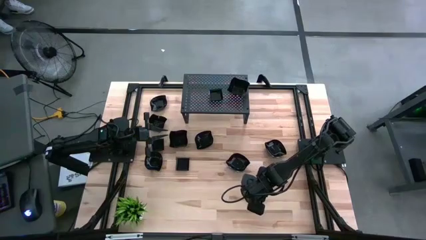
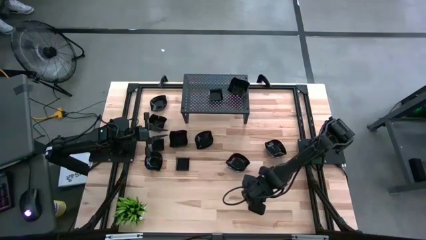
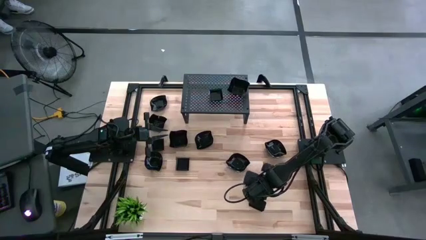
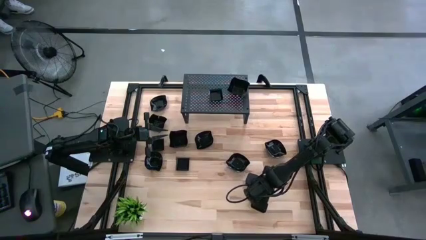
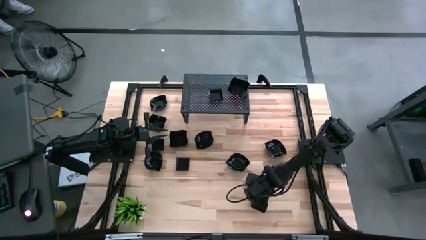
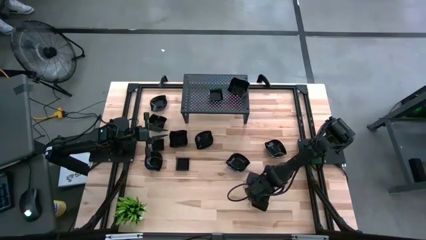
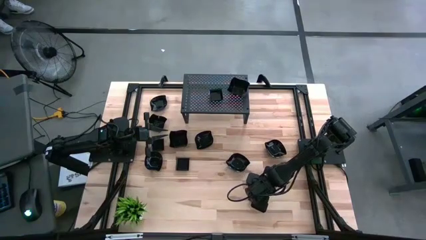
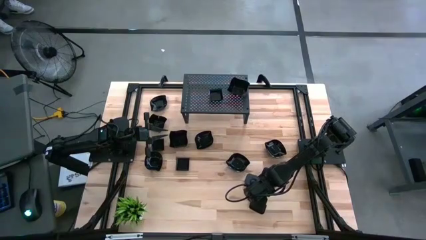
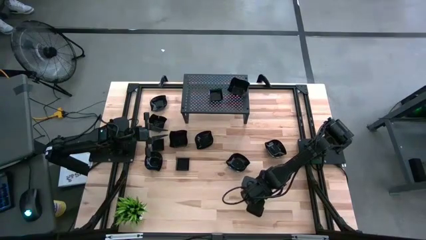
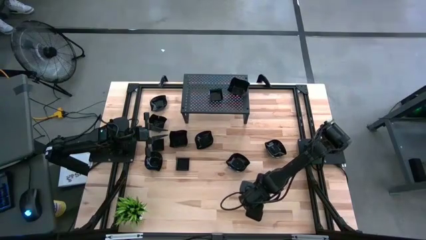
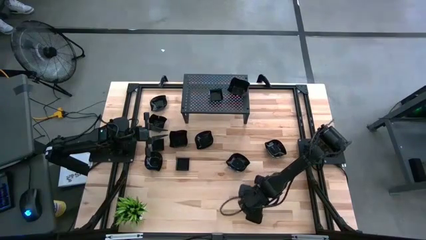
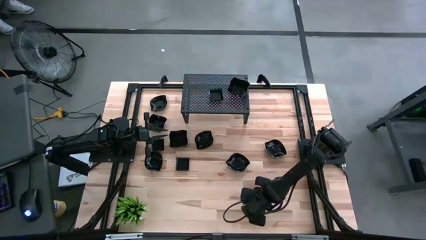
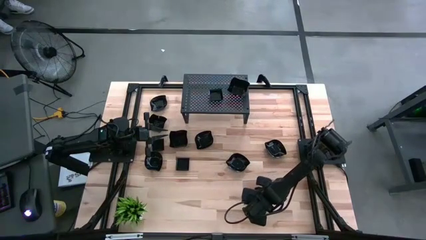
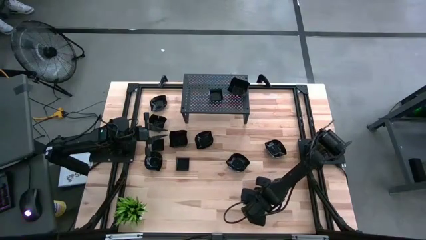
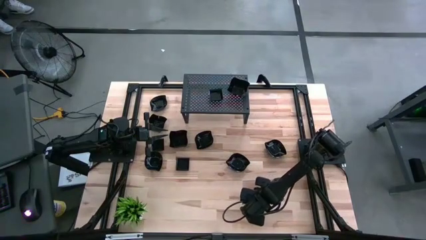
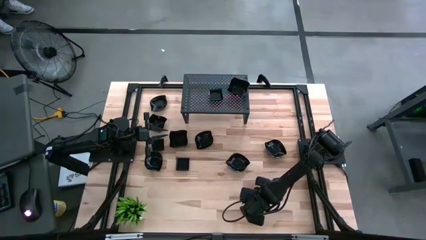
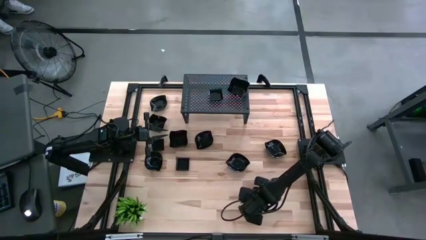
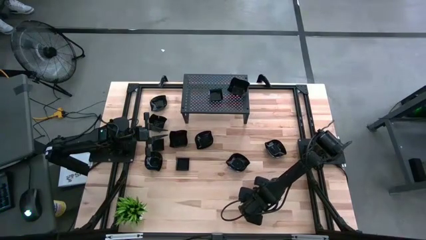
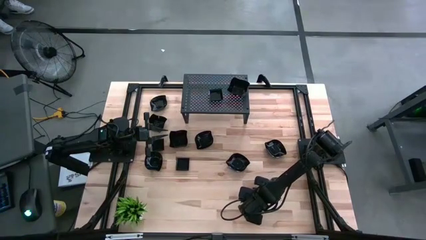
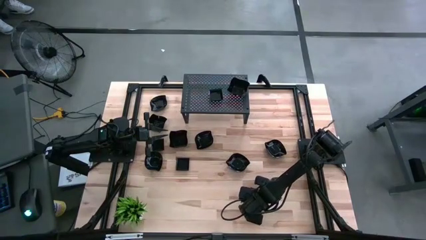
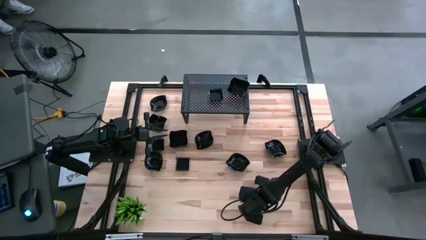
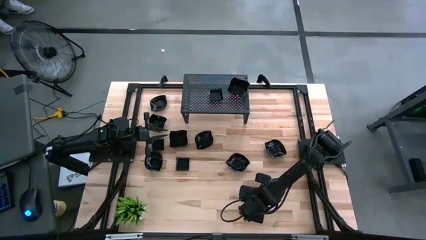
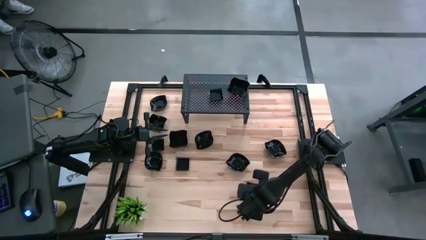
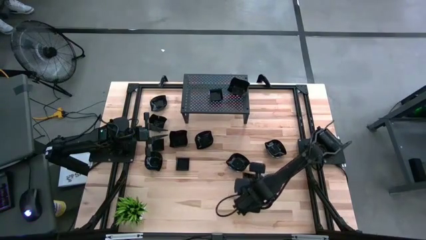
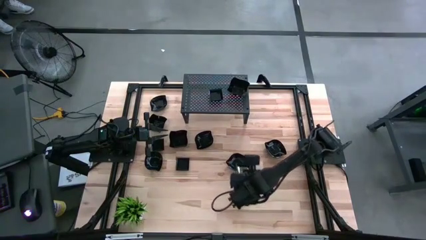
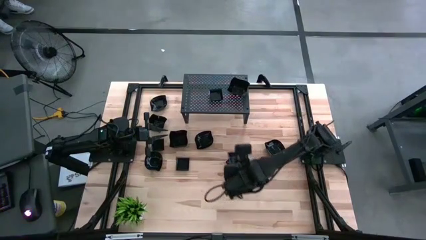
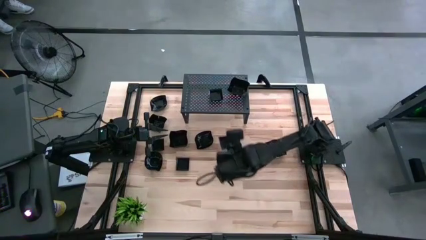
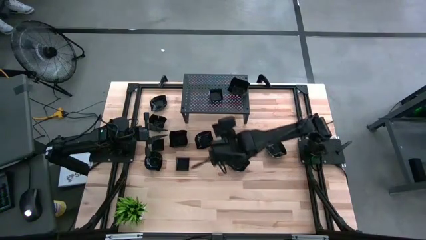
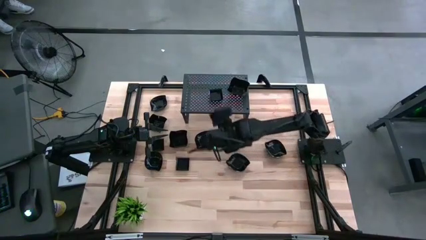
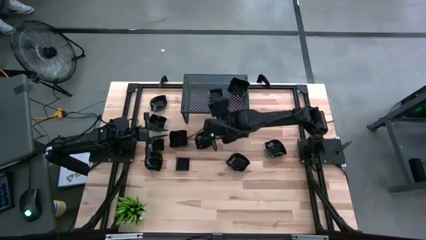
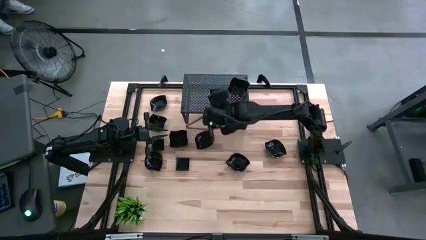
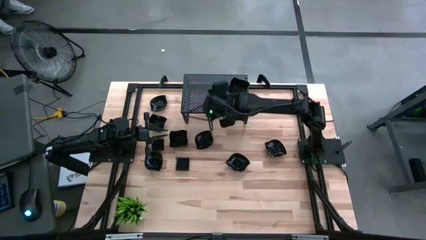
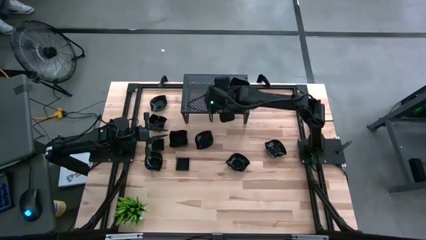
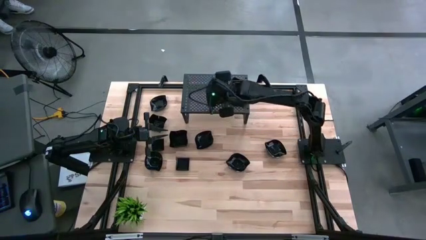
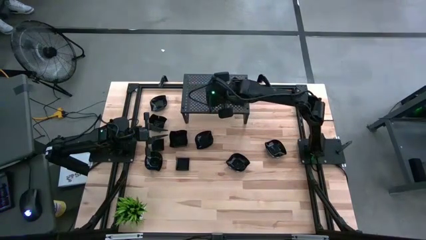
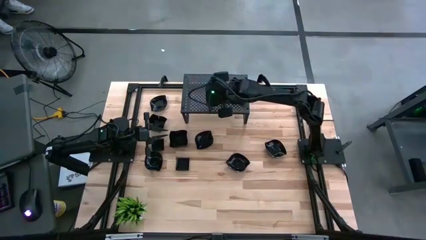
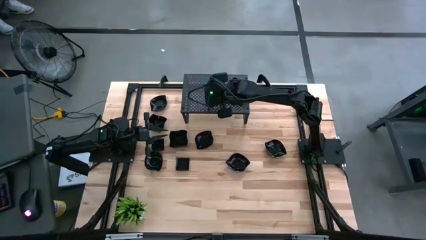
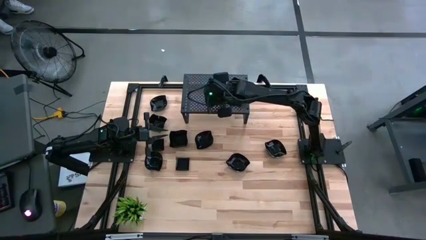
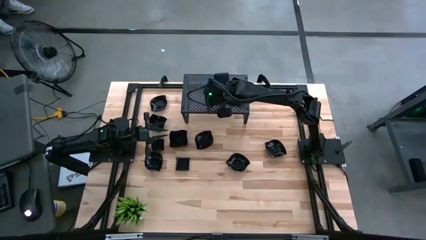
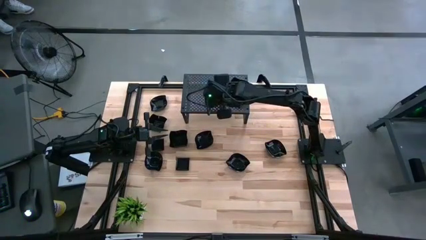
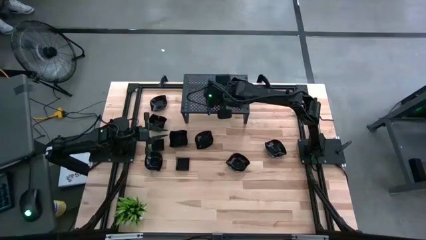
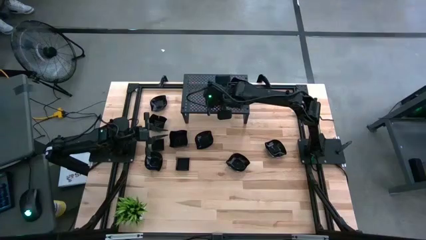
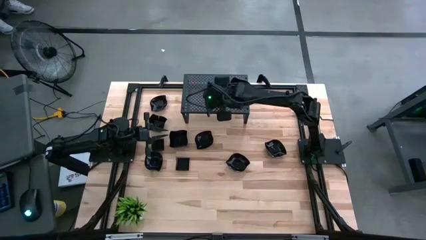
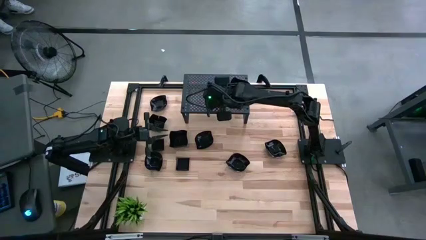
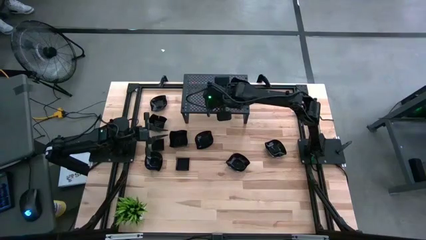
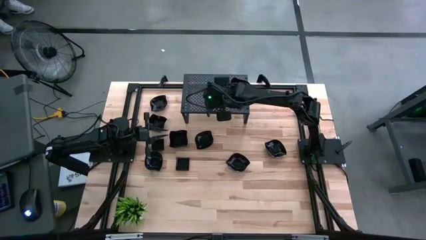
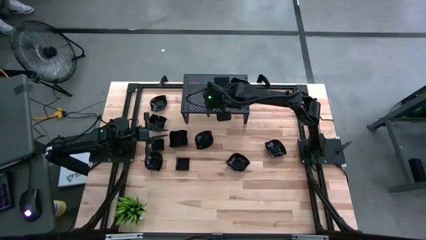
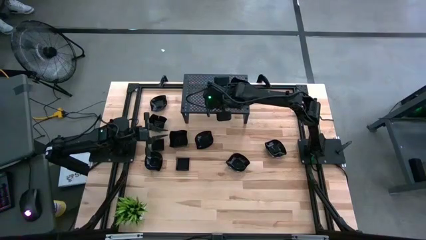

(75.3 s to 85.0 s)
Task: Pick & Place Mini shaped plates
Stack the black square plate on top of the black square plate on the shelf

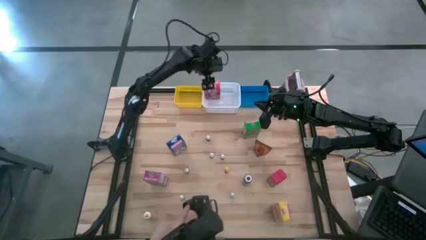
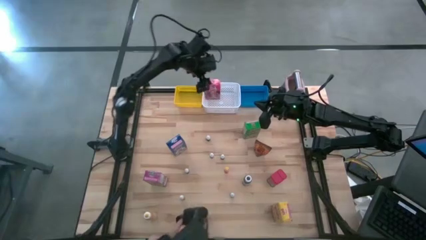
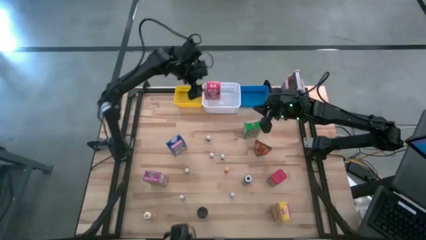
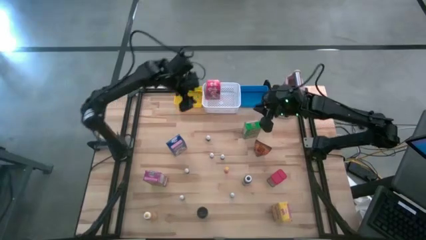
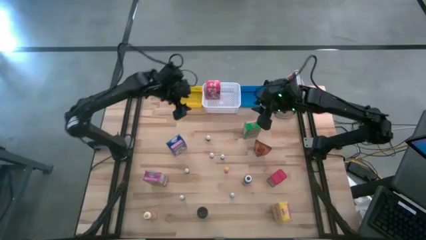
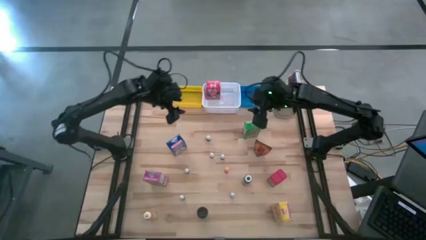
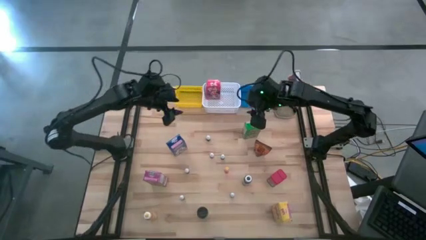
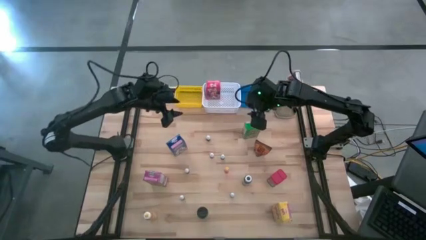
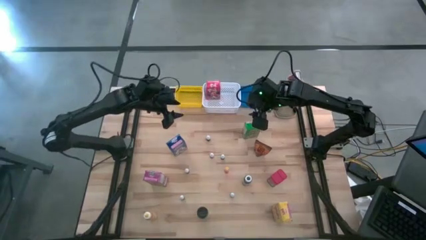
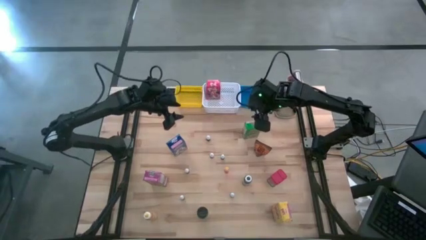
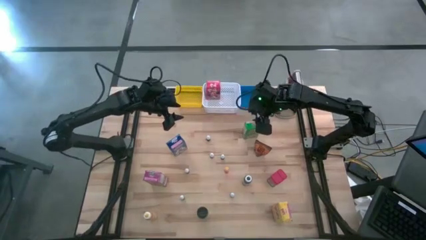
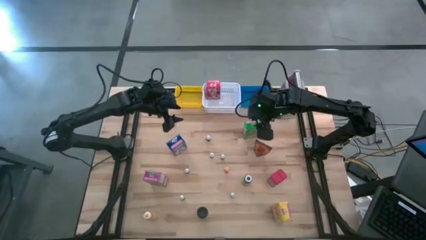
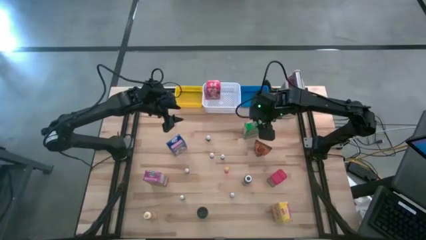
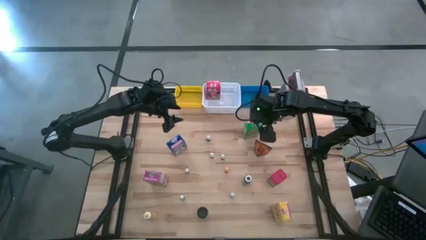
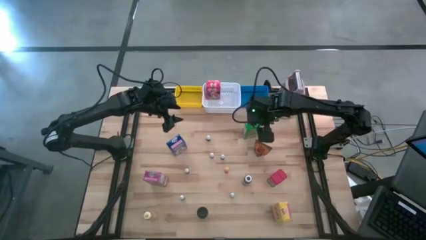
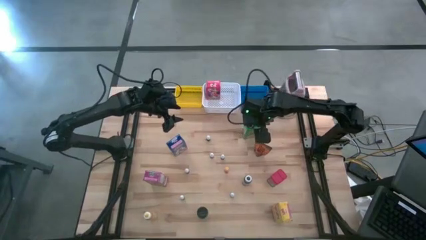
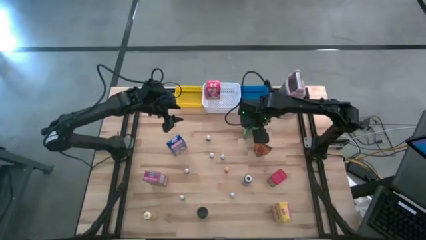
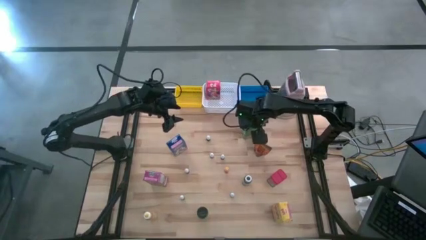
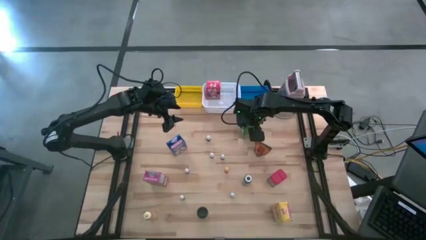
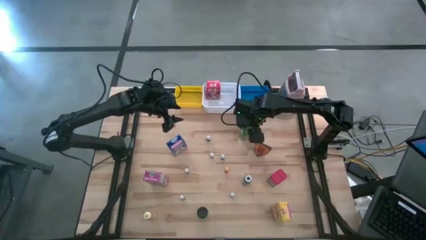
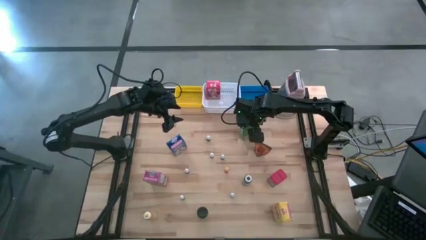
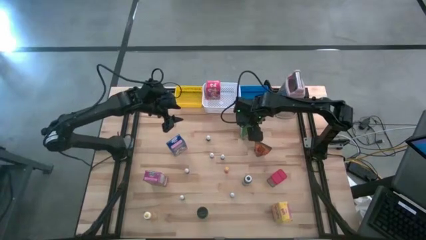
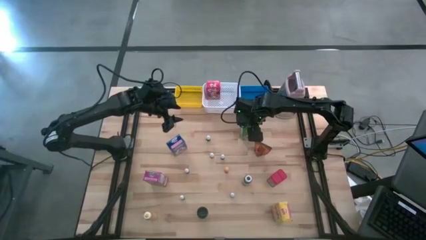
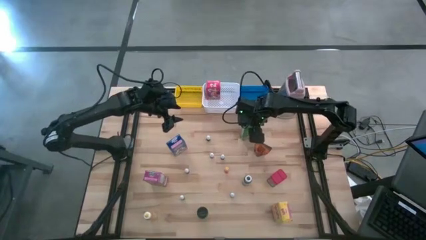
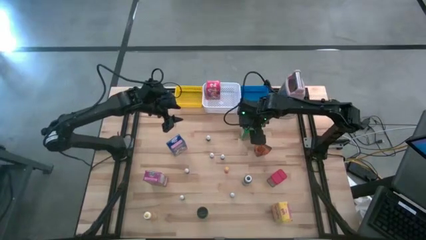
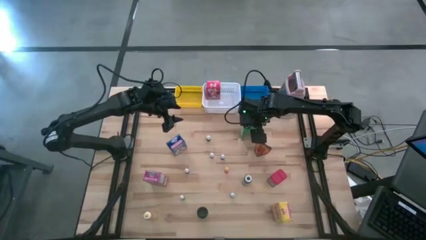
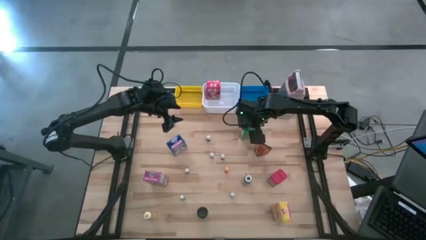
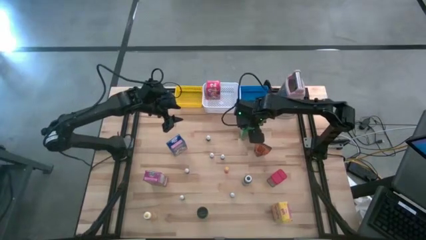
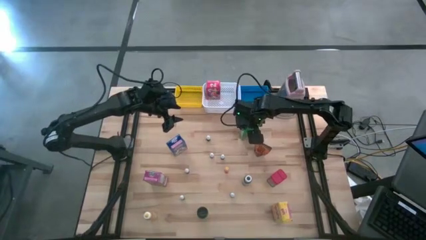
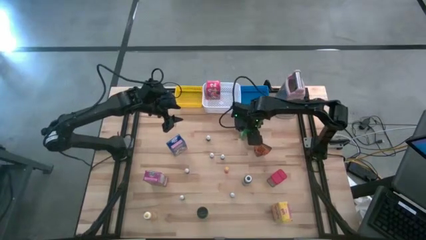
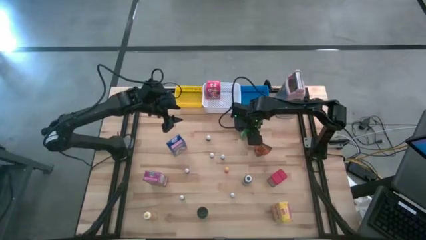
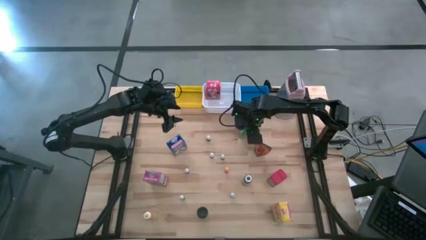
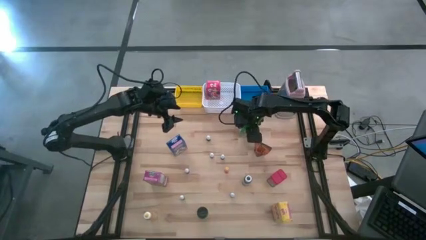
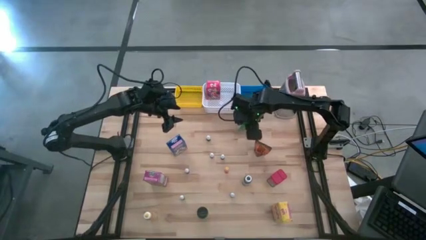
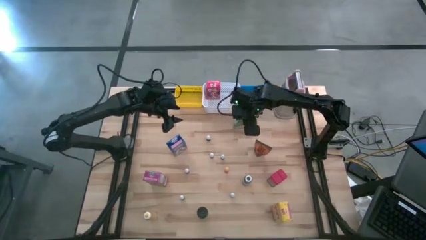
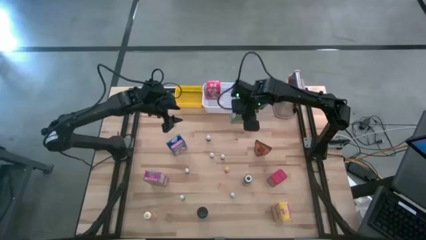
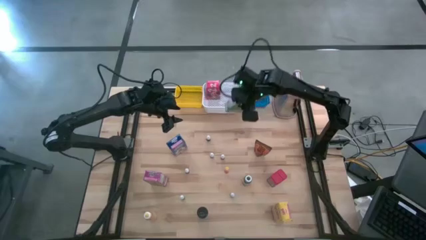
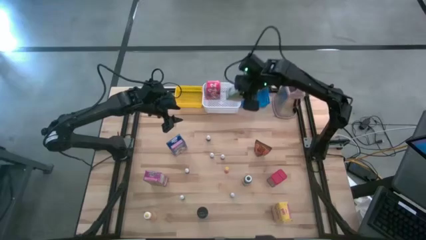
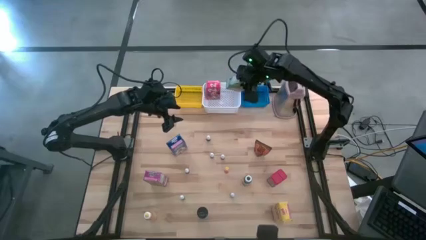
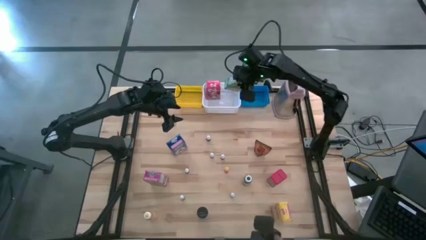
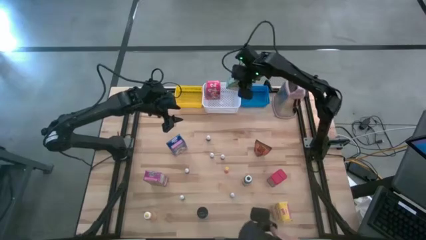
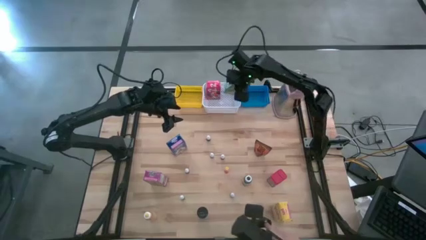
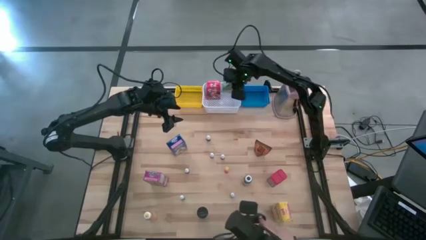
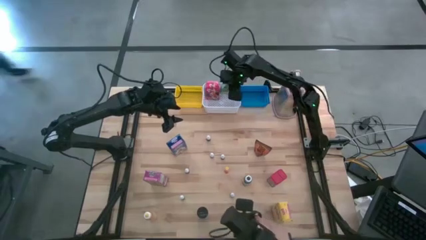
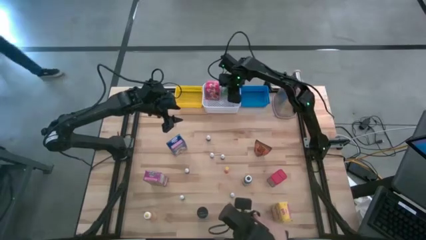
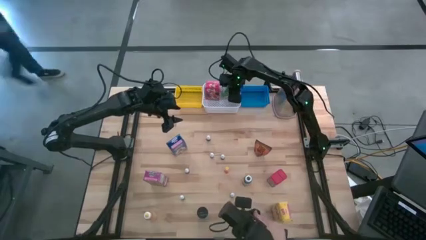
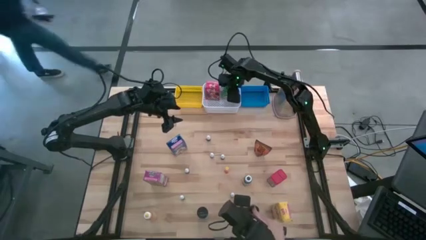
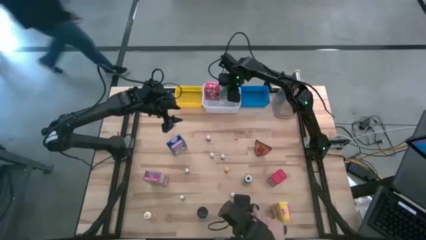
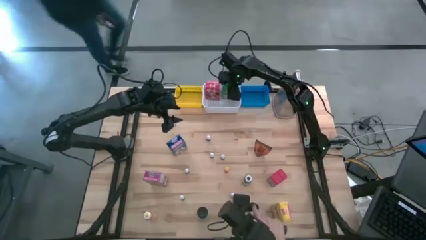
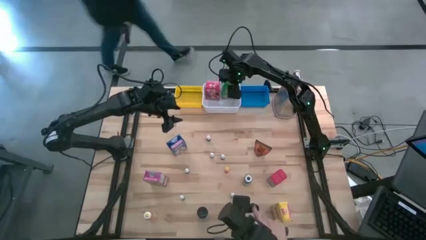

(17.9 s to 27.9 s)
Task: Pick & Place Kitchen Items
Put the green cereal box into the white basket
